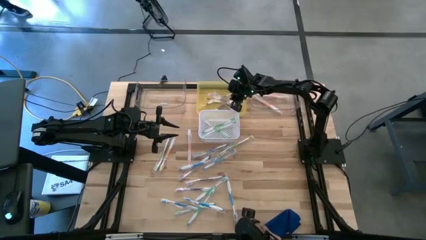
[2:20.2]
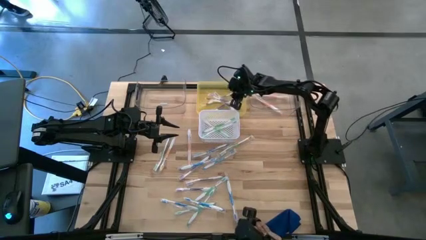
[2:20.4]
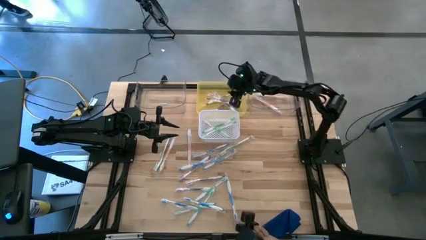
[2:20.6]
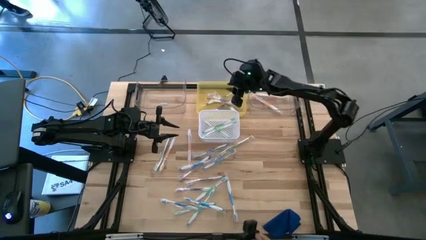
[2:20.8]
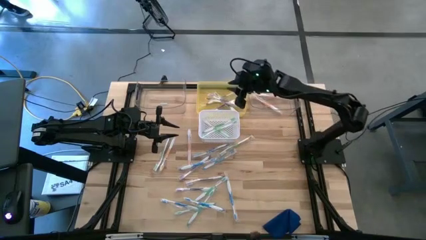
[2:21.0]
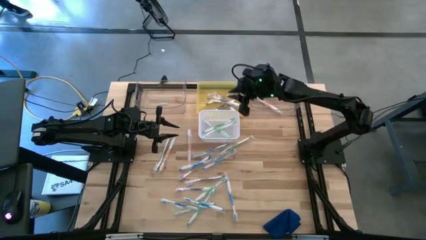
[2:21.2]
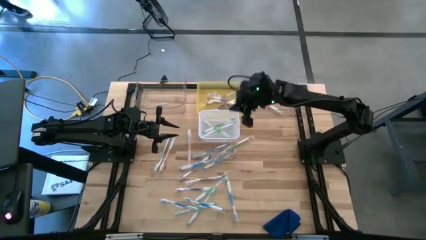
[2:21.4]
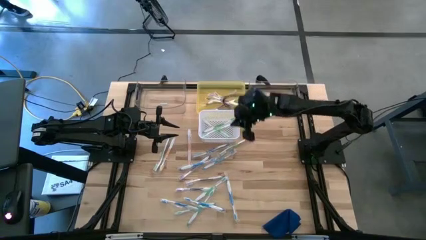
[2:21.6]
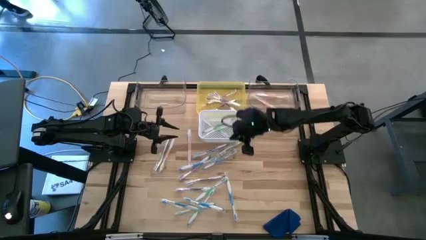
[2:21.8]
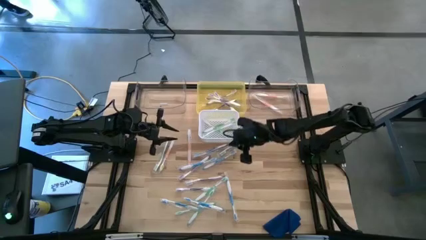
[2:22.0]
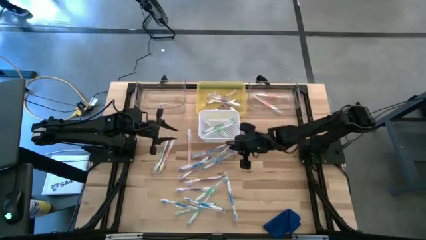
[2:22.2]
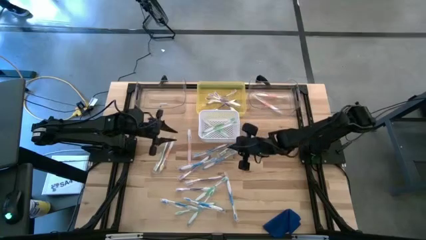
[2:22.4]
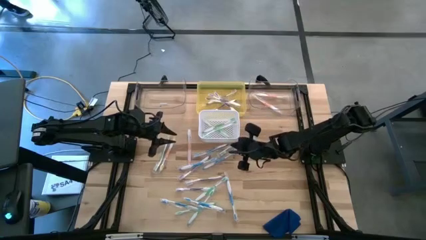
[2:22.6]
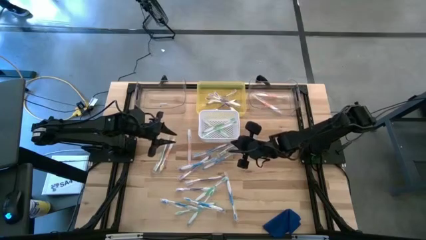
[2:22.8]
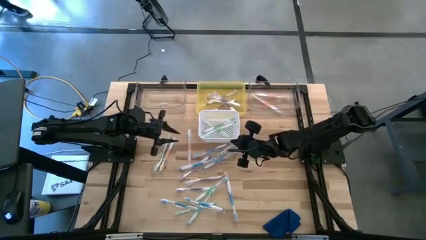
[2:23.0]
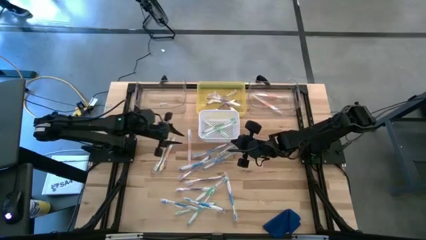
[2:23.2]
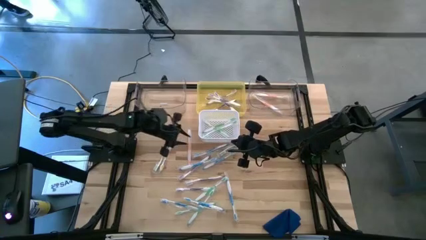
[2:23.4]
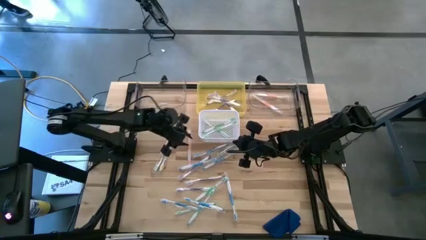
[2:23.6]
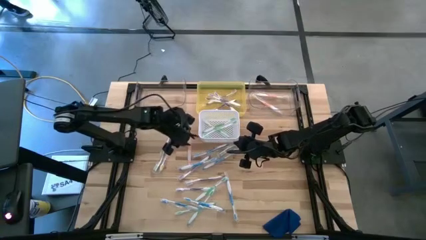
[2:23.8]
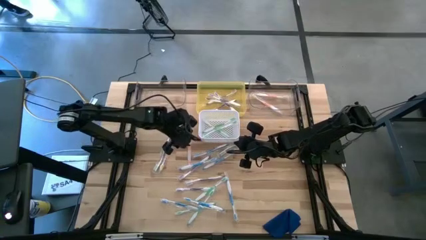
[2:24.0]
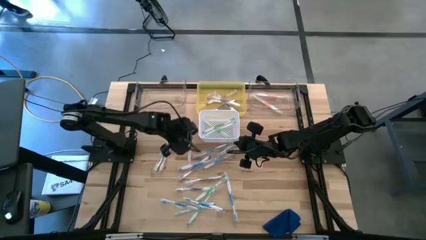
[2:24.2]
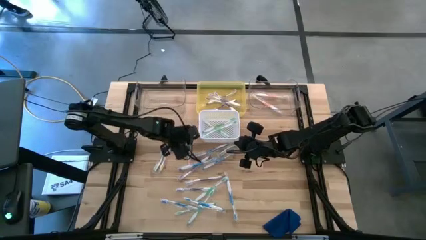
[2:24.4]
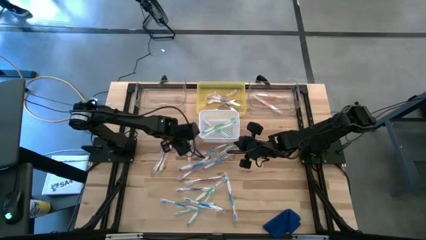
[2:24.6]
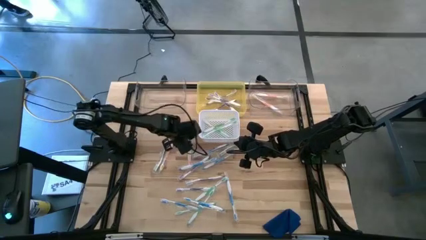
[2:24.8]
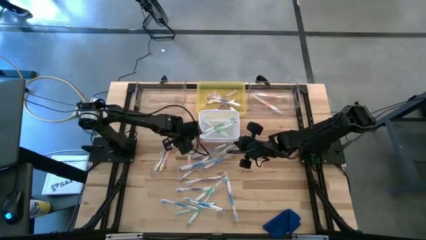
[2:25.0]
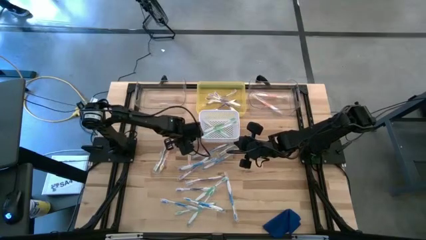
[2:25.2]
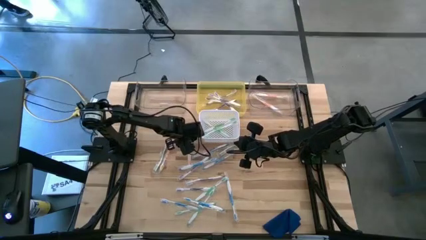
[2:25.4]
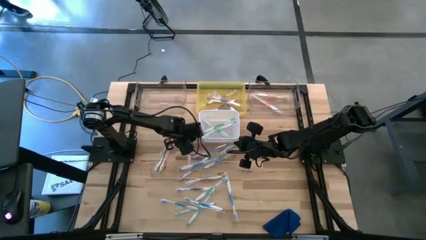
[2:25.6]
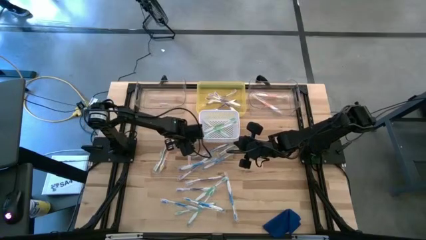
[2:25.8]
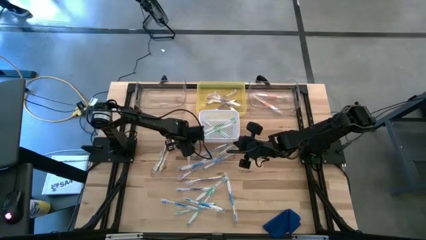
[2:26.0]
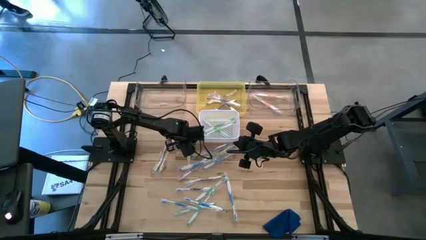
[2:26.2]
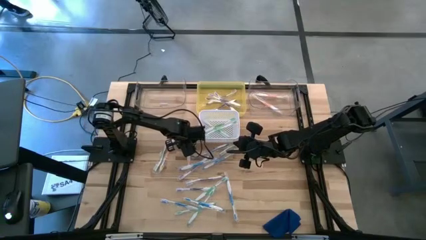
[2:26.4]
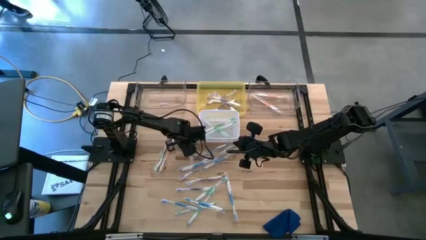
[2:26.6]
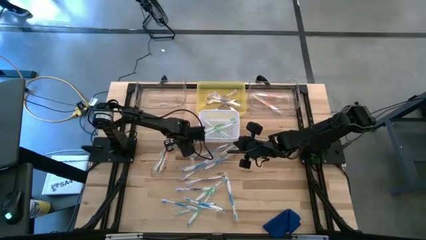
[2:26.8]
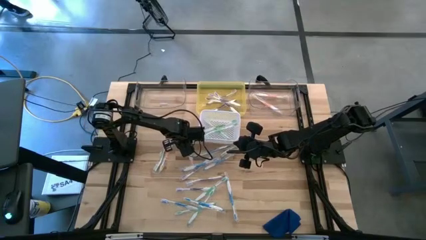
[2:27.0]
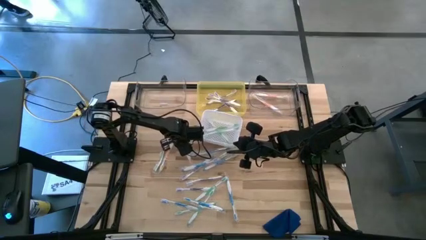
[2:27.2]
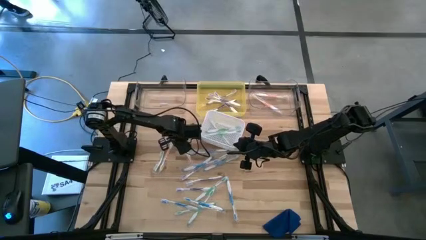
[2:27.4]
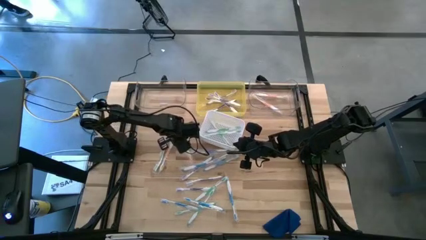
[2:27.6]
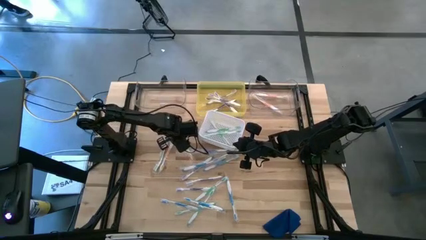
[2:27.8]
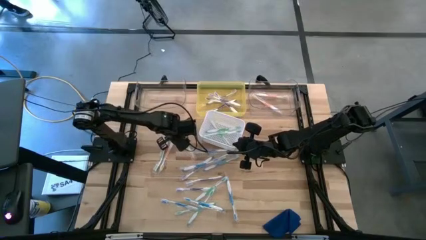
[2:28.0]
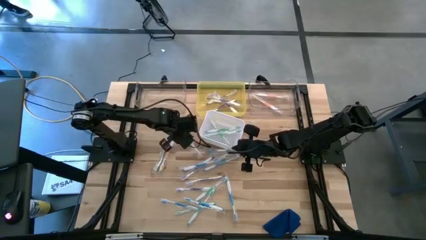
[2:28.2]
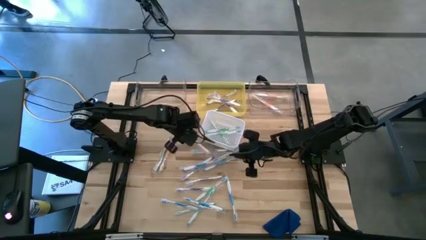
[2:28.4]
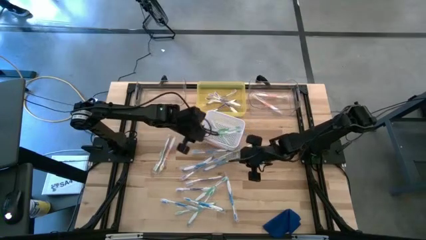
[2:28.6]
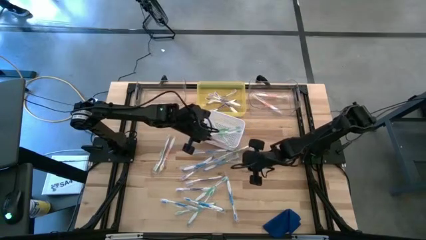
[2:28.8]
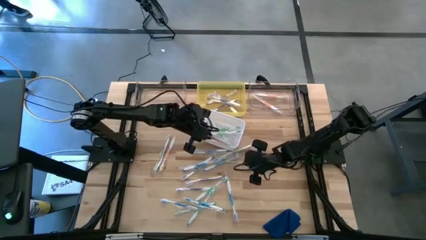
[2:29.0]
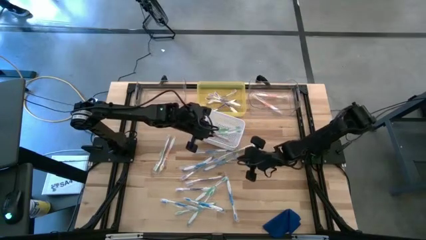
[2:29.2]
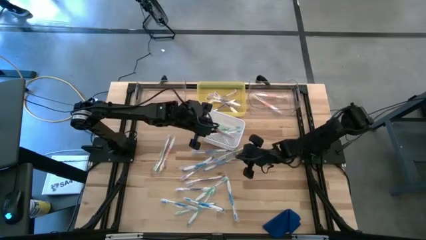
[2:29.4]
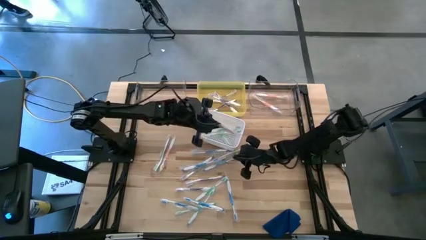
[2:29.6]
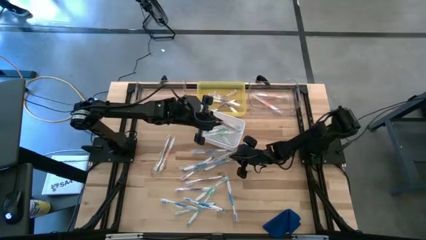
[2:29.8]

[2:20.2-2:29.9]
Task: Pick & Place Toothbrushes
Put the orange toothbrush into the right transparent bin

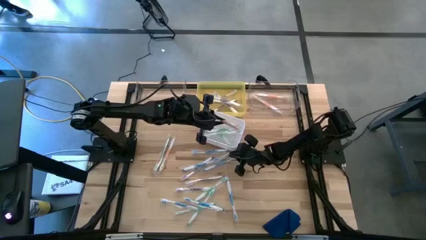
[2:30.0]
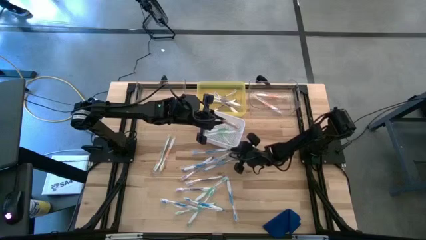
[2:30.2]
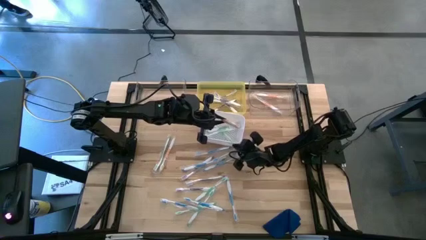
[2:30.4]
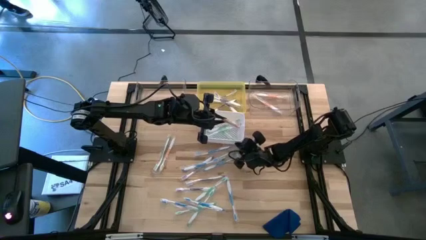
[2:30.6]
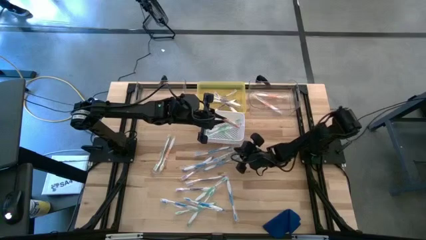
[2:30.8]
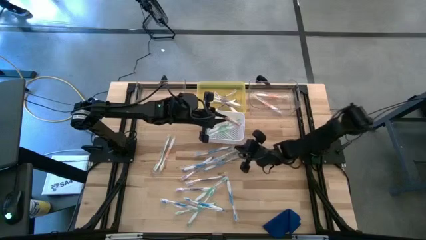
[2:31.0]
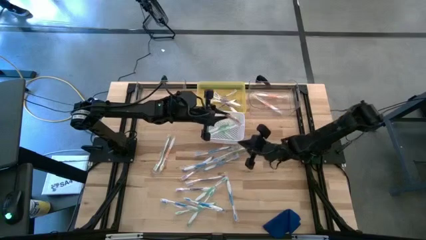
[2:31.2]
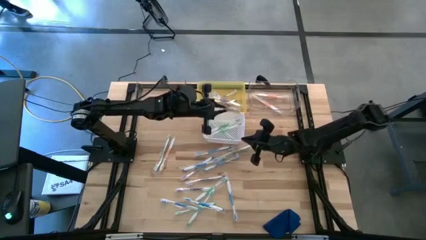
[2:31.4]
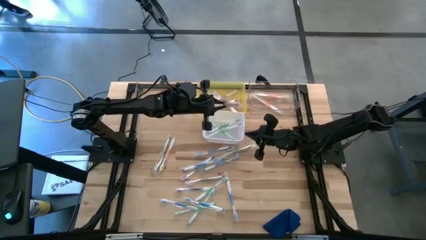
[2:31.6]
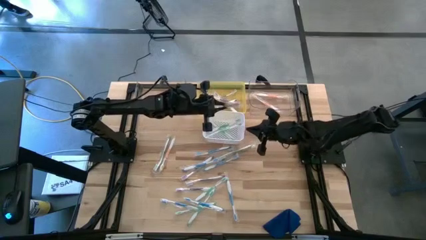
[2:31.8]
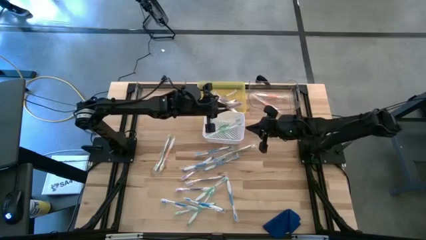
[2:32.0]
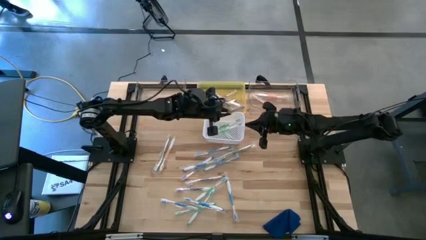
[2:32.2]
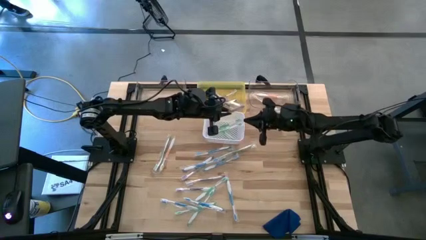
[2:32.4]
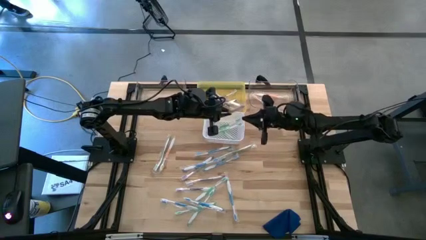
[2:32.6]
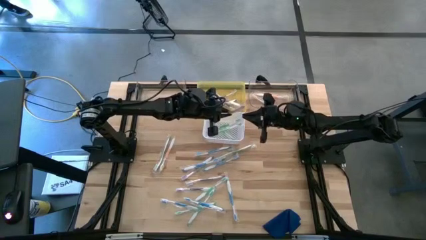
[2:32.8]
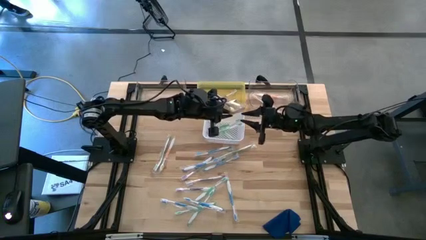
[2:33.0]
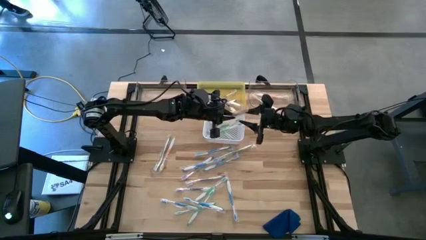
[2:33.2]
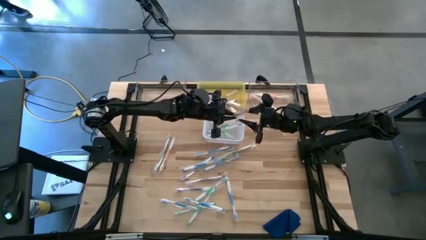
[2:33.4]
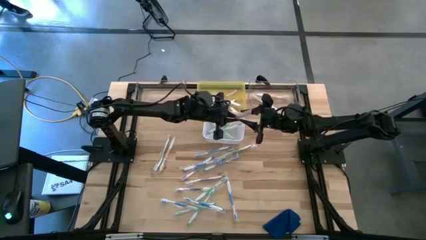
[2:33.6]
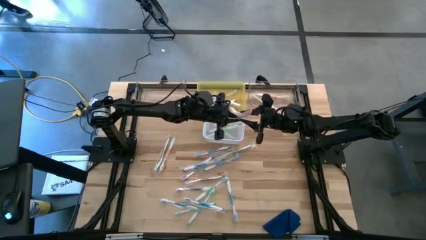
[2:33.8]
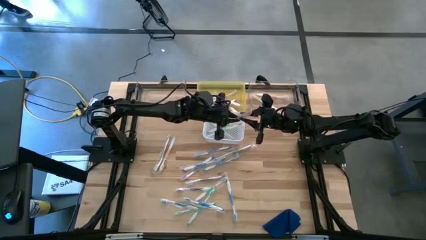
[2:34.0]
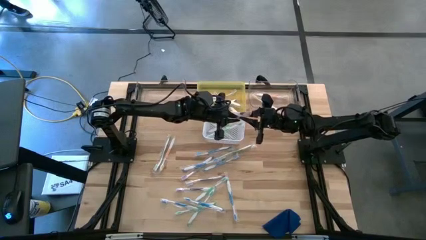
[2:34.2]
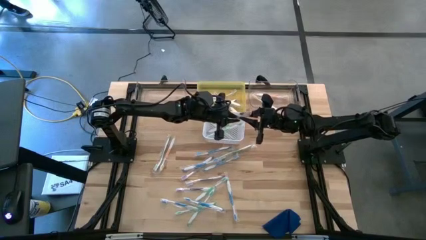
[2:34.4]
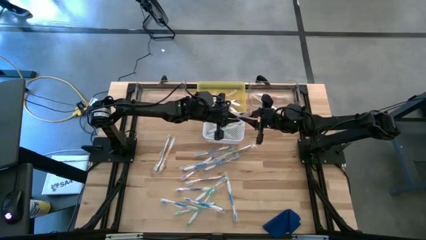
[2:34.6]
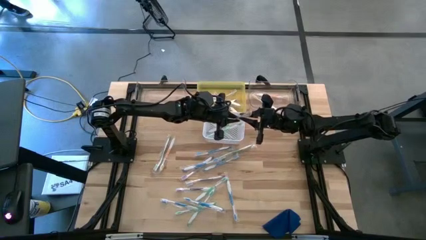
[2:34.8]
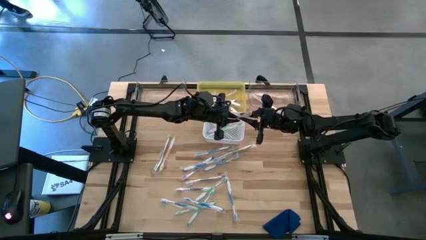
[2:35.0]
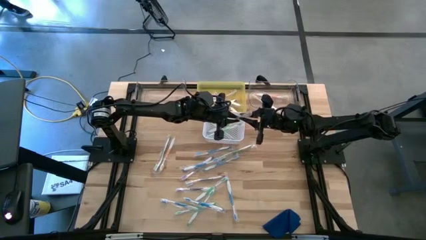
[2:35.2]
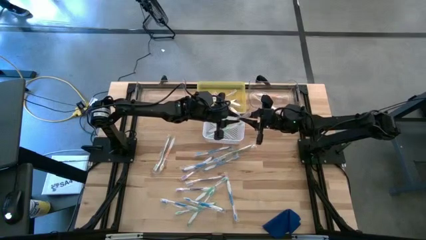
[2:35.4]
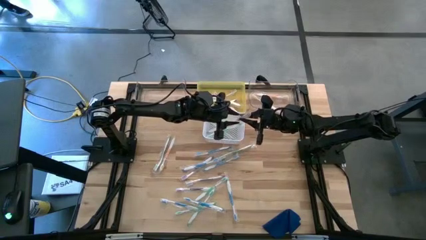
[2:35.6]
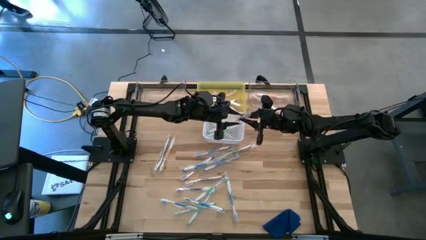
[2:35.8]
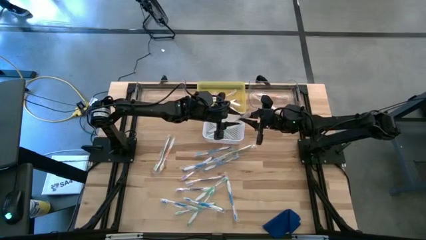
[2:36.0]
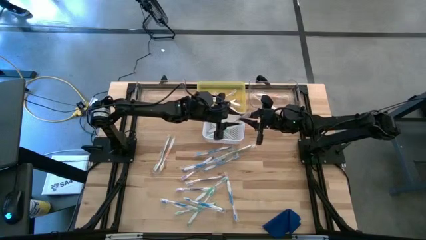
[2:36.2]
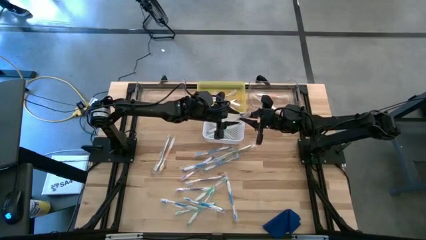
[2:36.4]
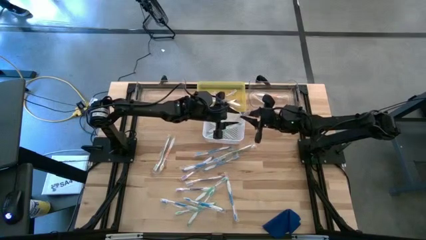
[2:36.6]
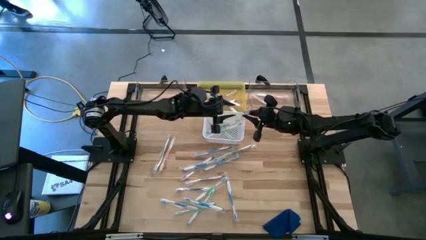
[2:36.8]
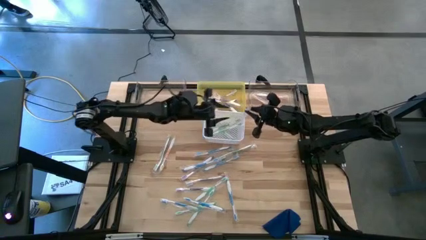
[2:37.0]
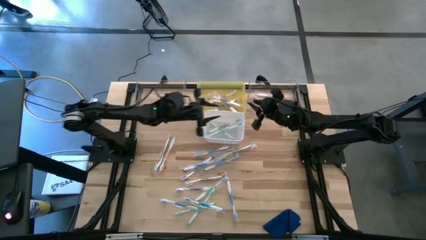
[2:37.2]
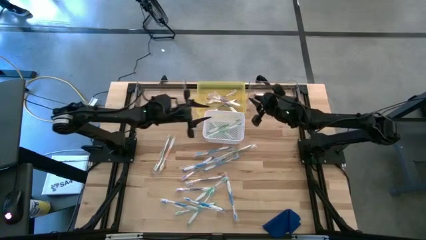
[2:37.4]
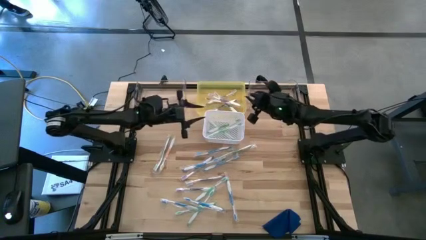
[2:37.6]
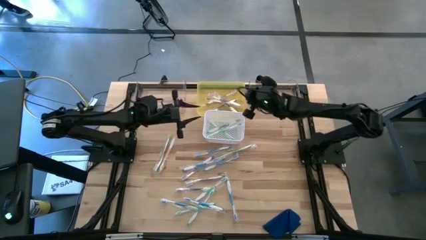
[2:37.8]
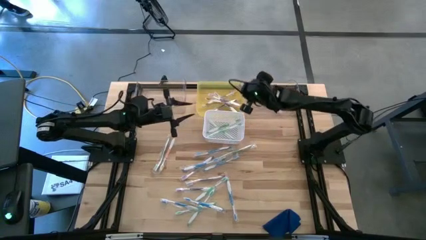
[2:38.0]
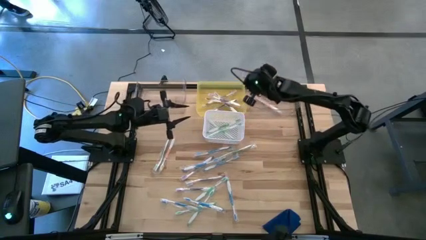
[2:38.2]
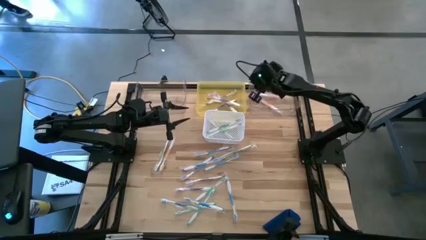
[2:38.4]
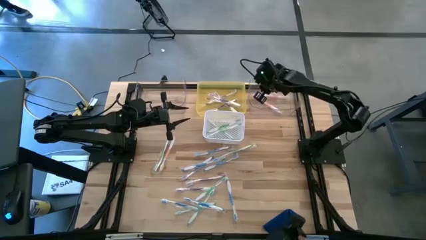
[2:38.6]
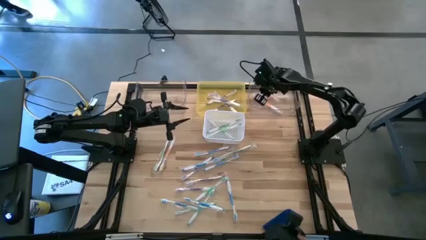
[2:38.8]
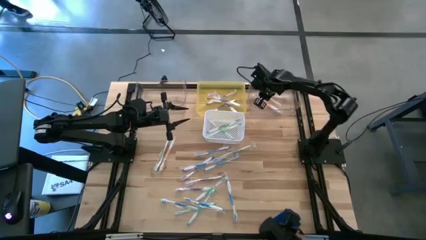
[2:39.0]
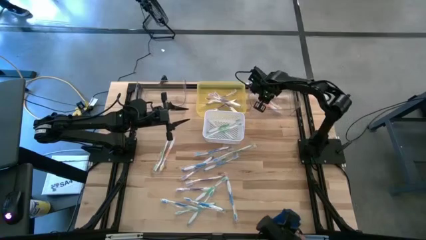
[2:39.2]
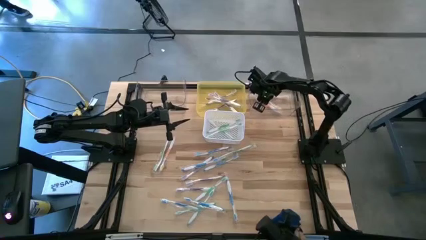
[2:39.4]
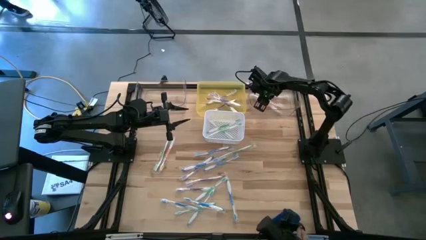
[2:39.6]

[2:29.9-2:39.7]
Put the orange toothbrush into the right transparent bin
